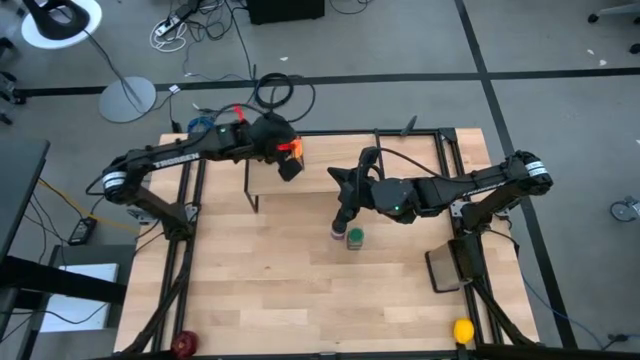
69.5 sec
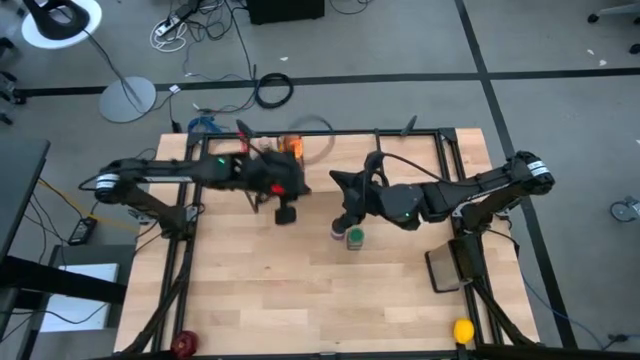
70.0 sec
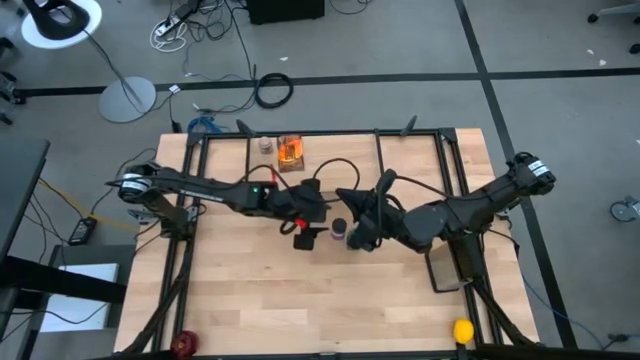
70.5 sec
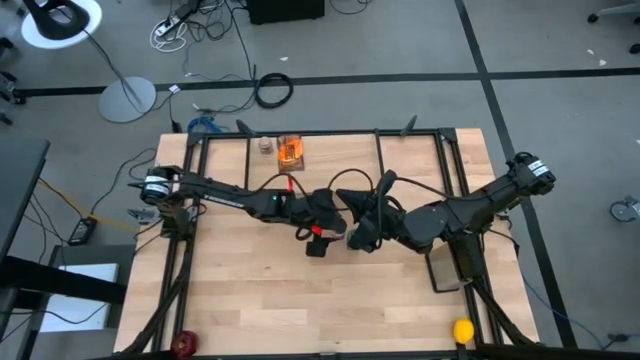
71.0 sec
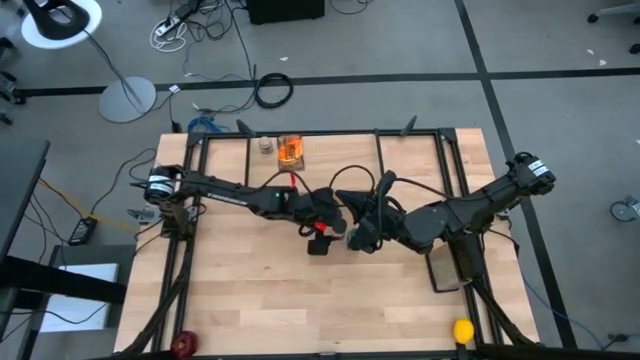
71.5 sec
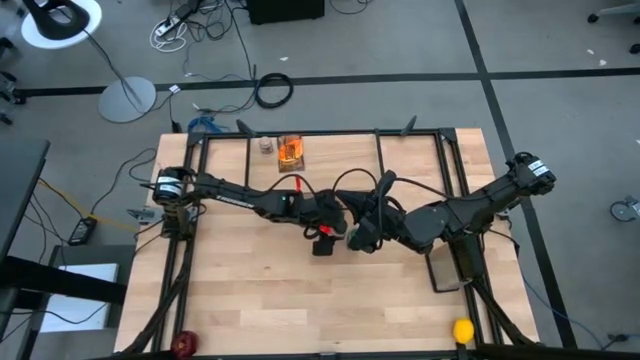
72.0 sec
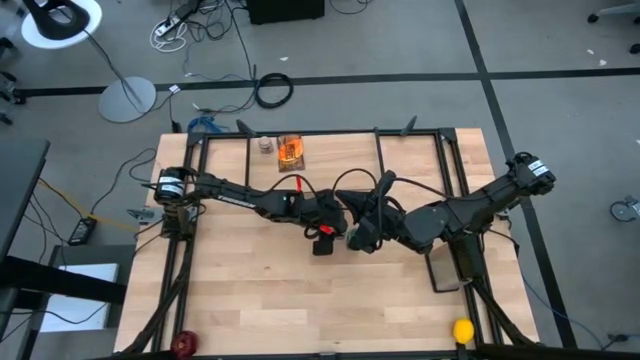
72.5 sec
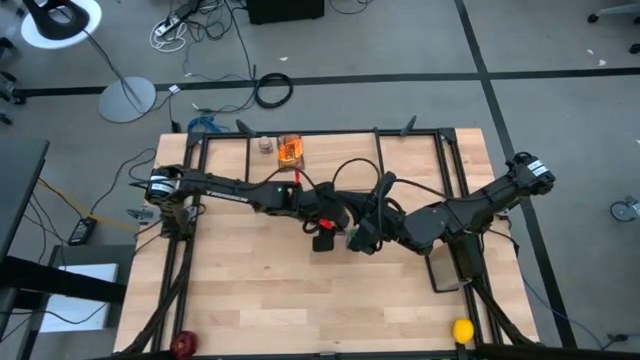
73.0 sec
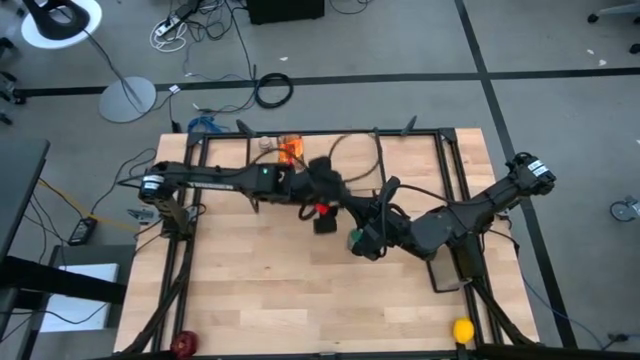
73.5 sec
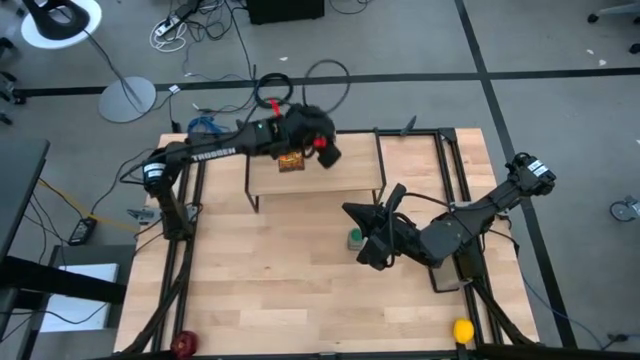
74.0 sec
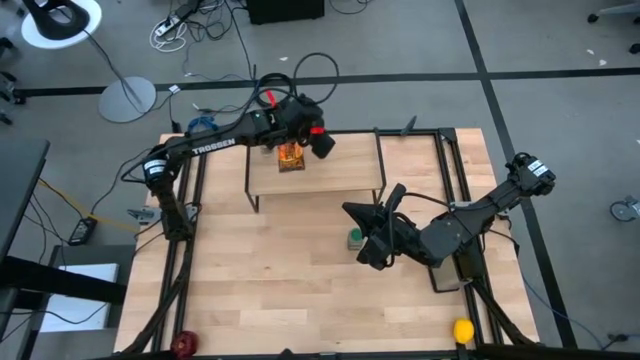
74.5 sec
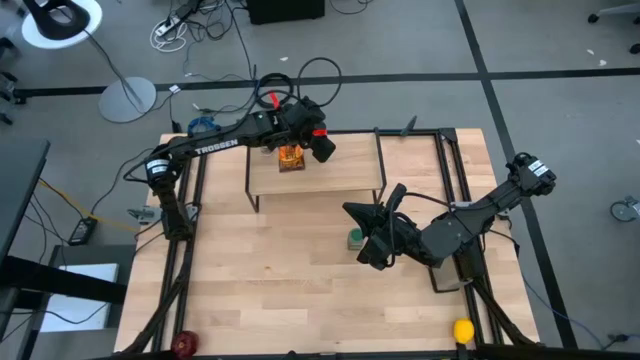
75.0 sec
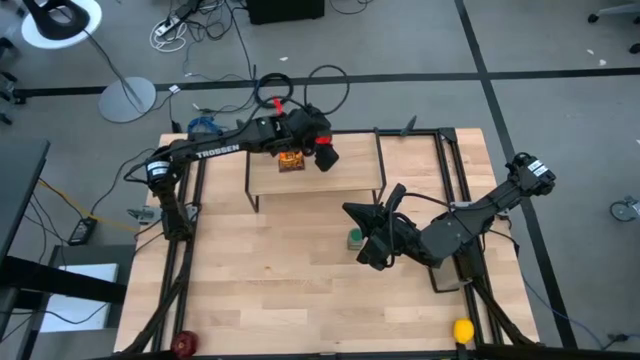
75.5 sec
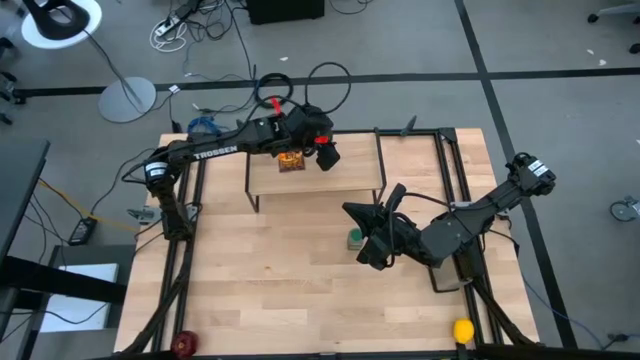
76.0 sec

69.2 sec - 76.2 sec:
Task: Shelf spices
Put the purple seasoning bottle on the shelf

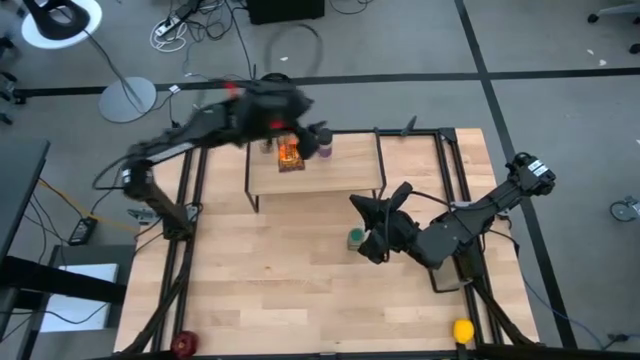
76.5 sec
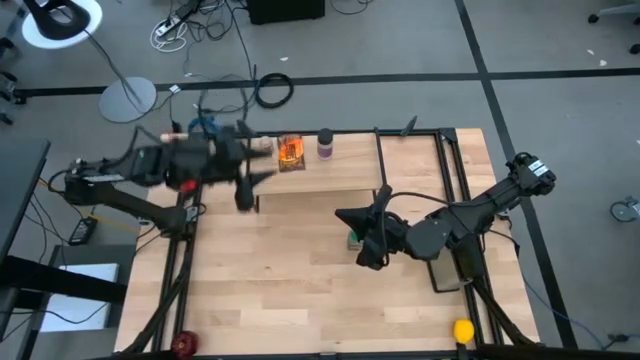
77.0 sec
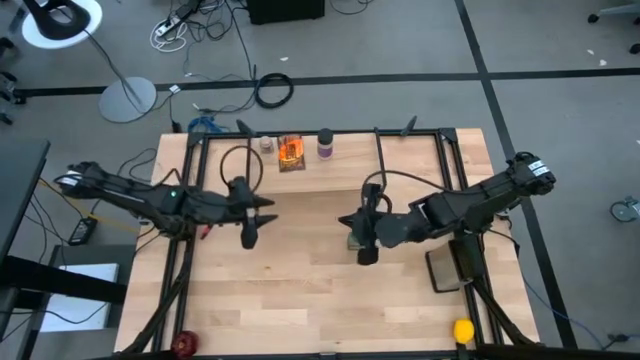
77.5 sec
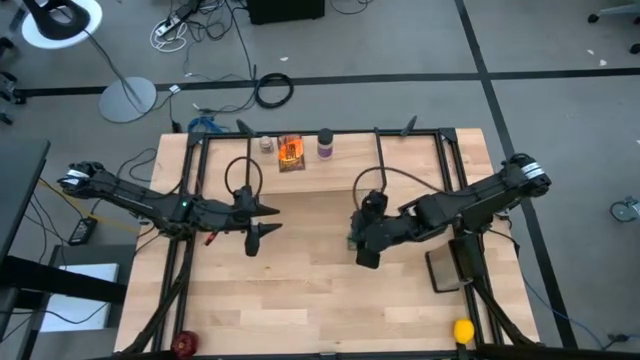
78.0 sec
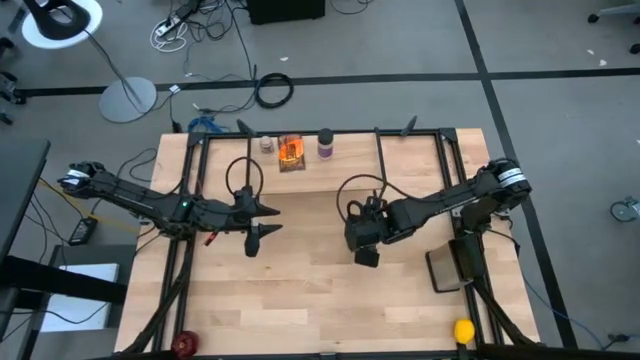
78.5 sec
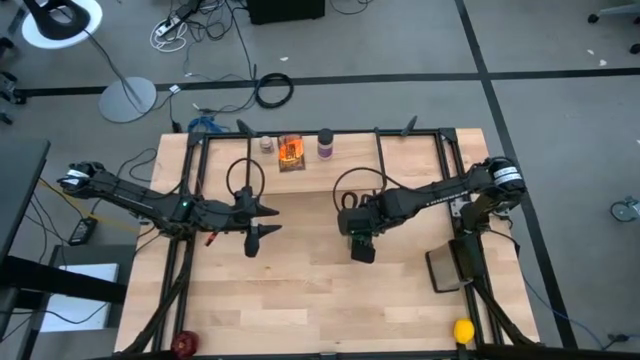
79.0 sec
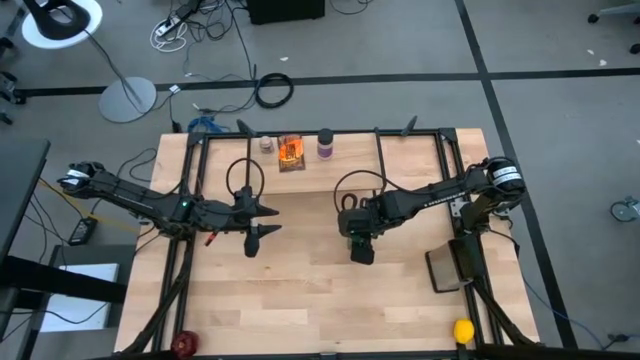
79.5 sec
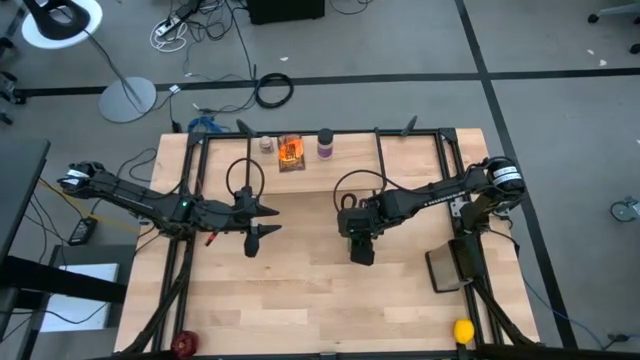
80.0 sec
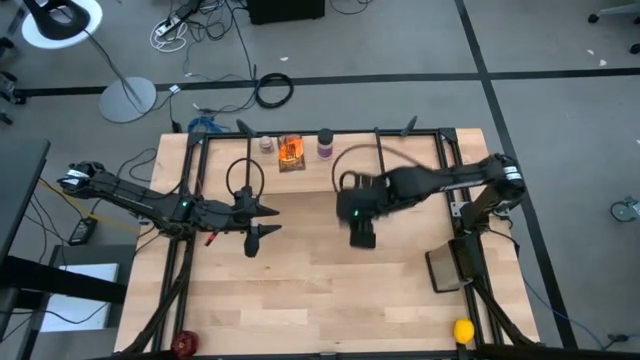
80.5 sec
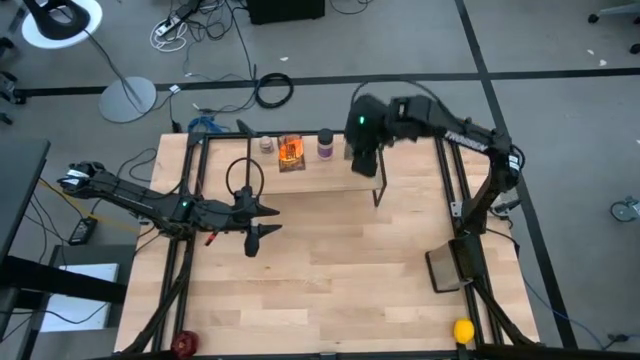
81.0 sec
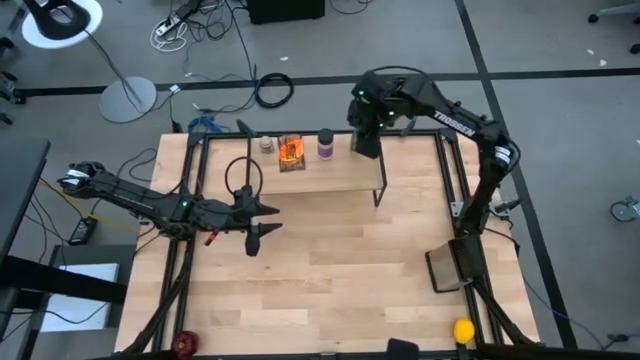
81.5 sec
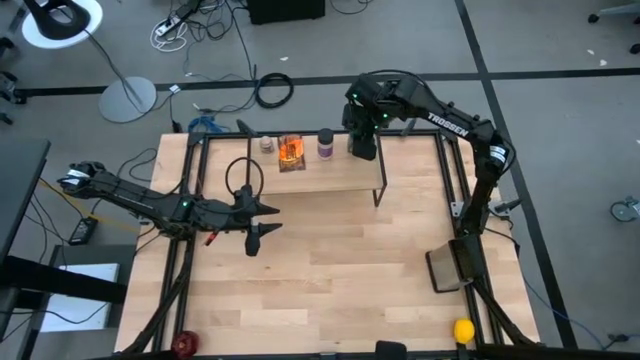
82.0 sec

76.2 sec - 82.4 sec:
Put the green seasoning bottle on the shelf

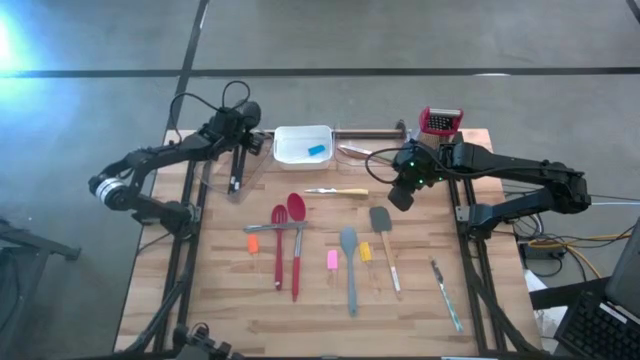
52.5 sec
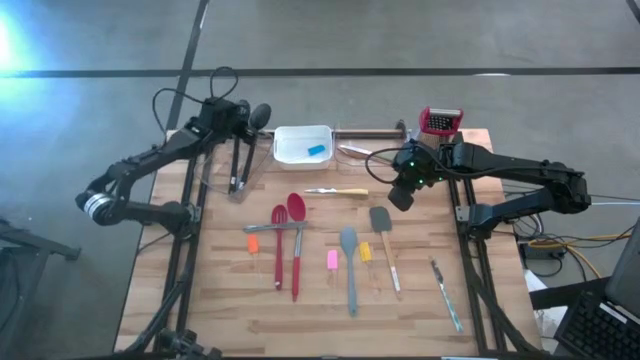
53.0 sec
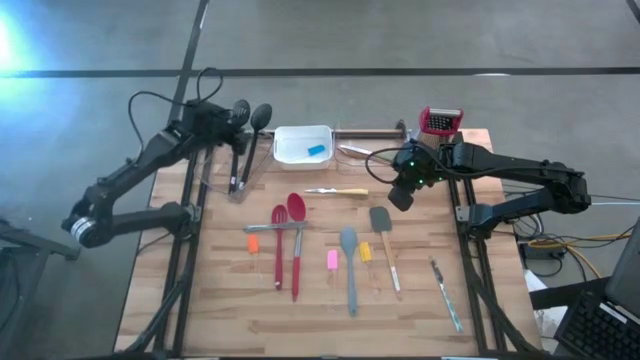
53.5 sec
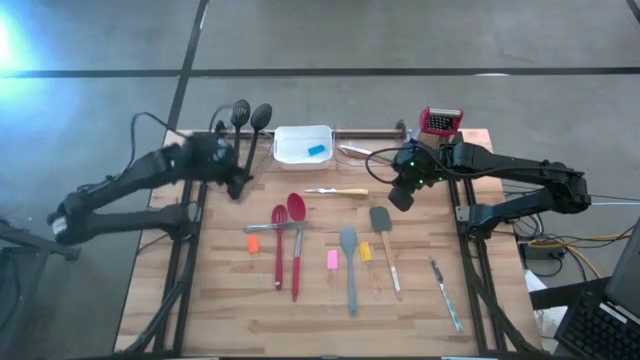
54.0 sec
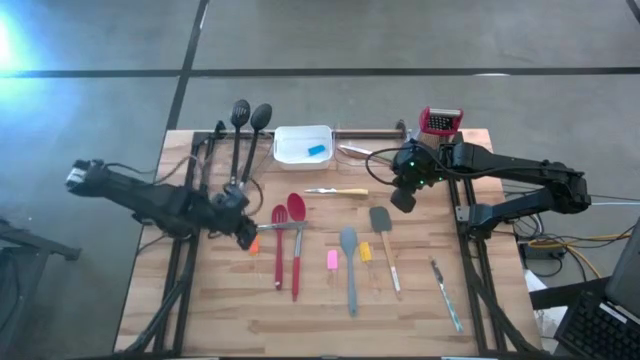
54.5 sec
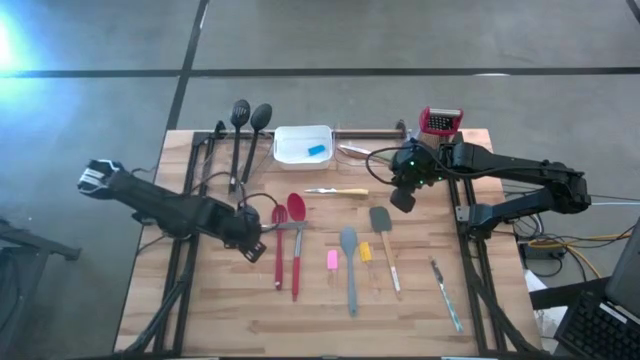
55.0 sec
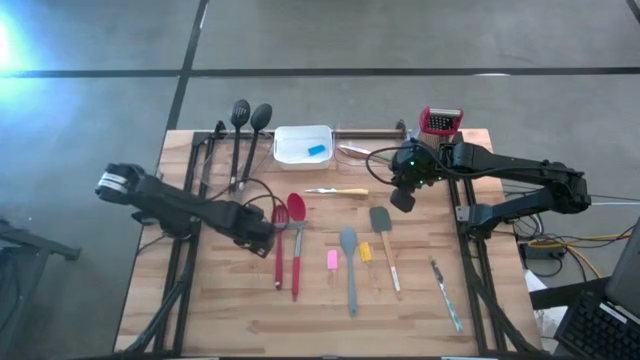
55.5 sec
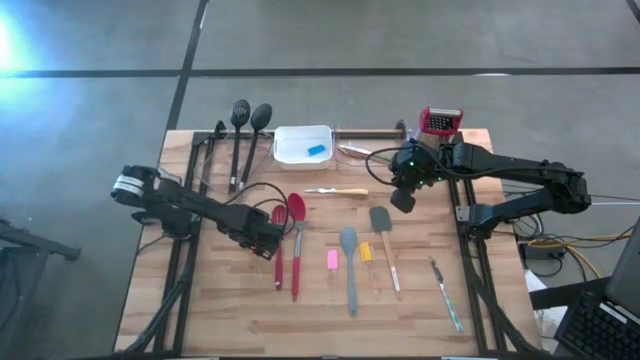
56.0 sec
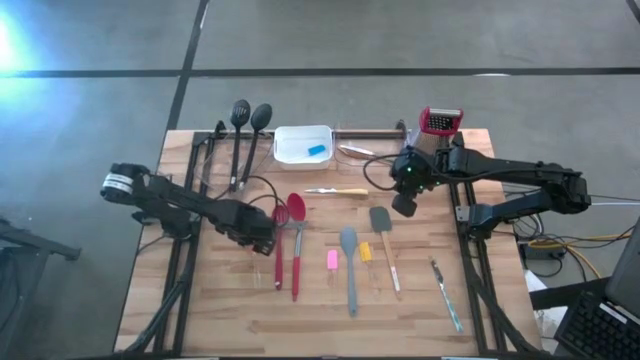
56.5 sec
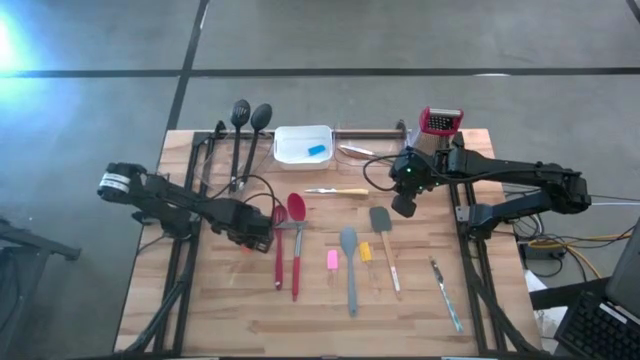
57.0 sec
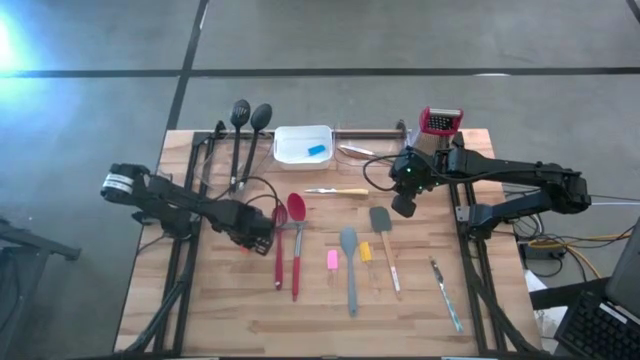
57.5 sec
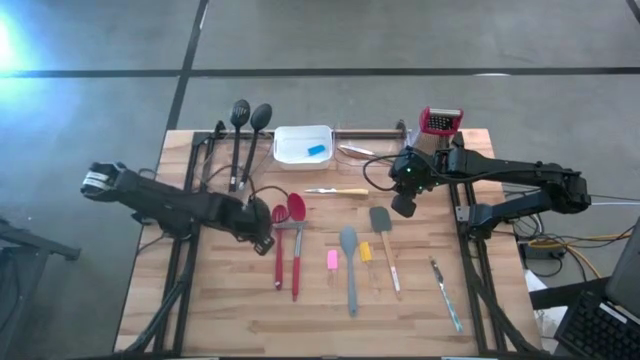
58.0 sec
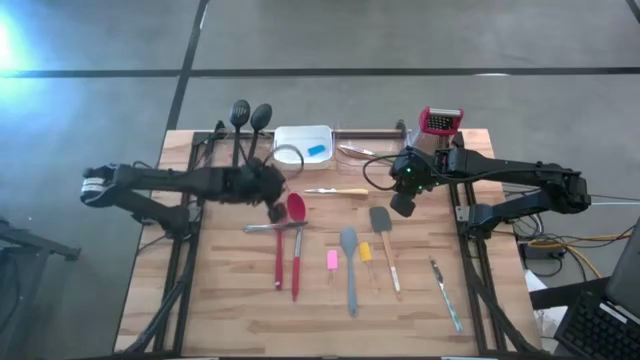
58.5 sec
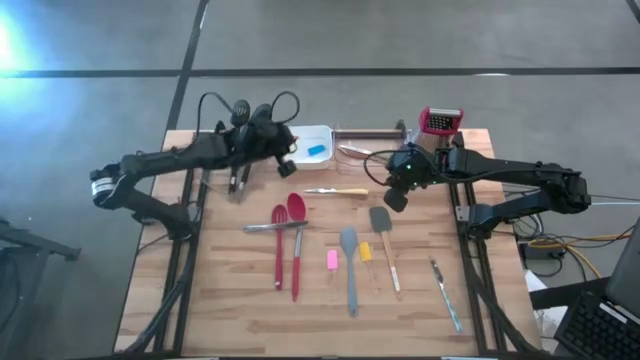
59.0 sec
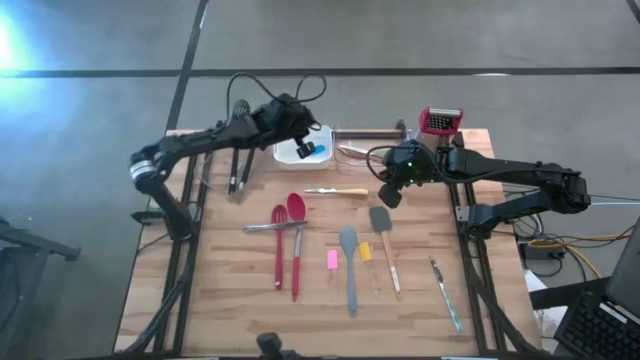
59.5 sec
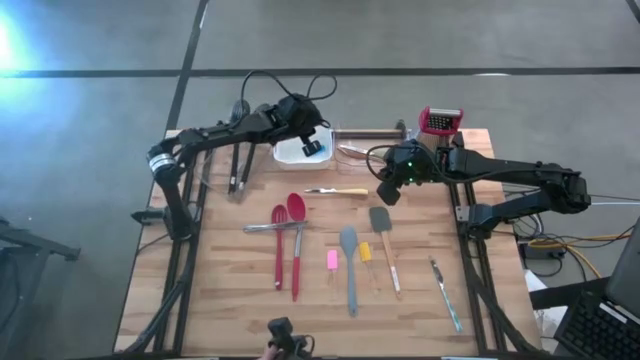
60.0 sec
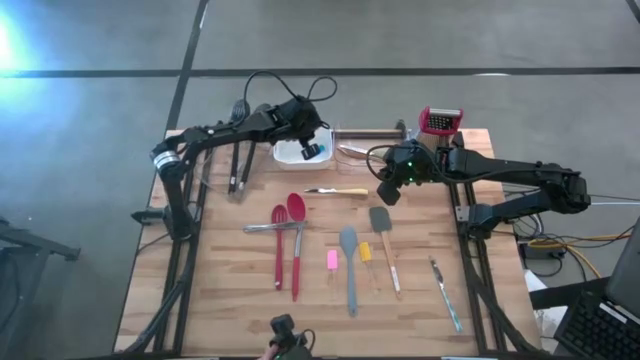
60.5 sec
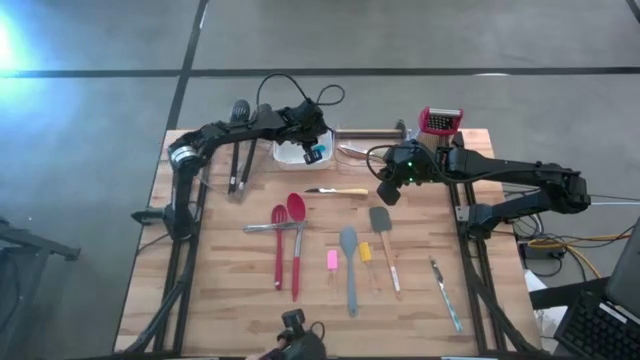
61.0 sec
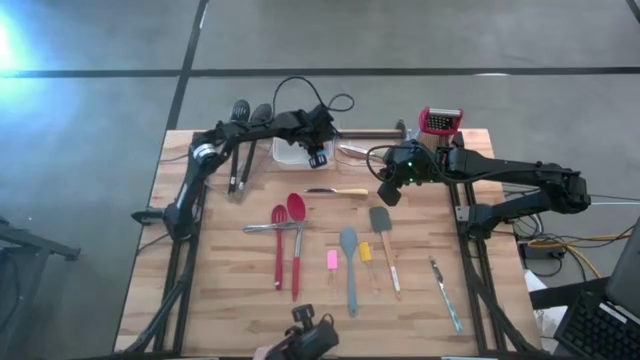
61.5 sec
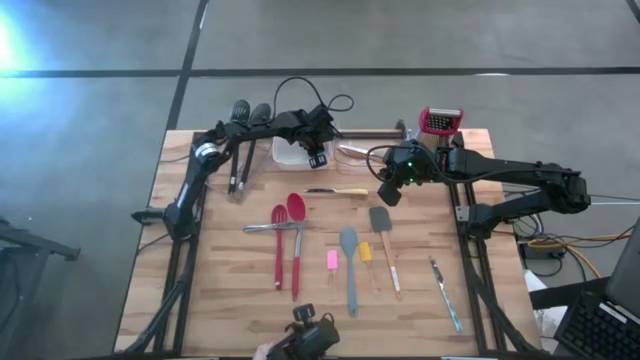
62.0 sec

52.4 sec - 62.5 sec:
Task: Pick & Place Kitchen Items
Put the orange spatula into the white bin
